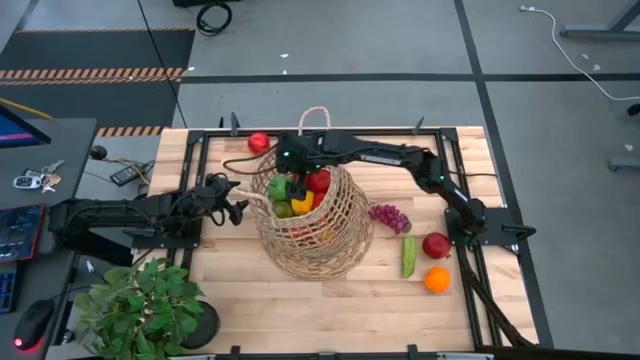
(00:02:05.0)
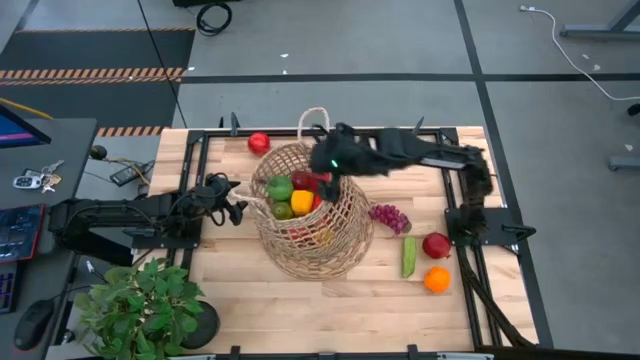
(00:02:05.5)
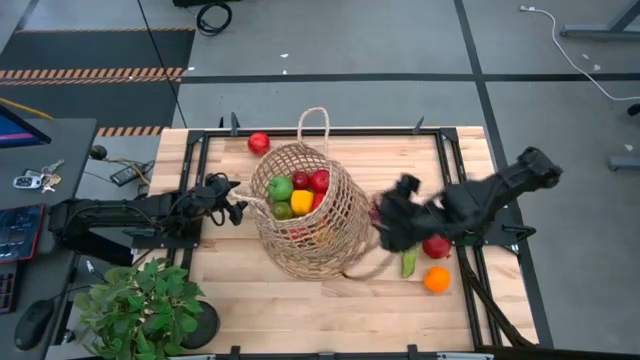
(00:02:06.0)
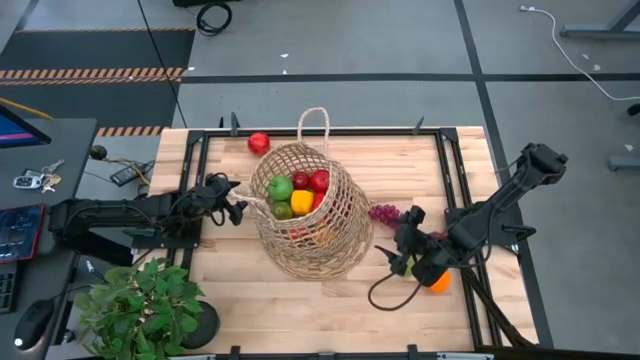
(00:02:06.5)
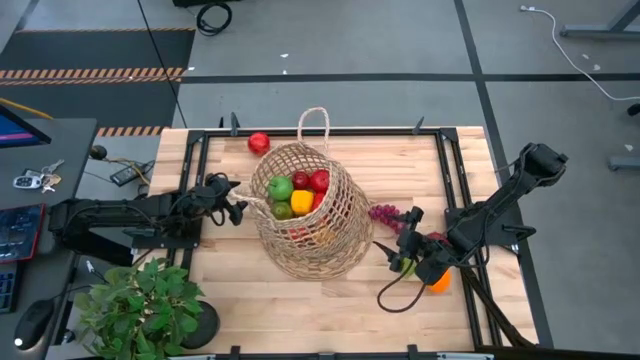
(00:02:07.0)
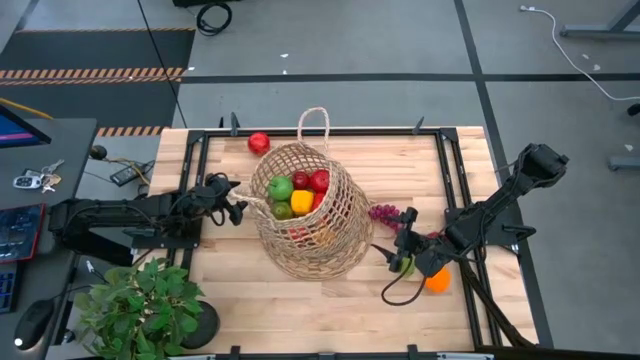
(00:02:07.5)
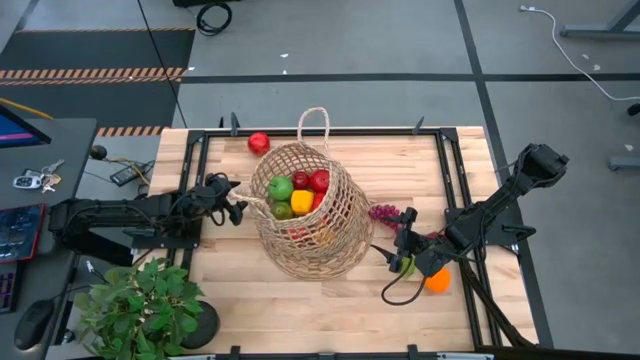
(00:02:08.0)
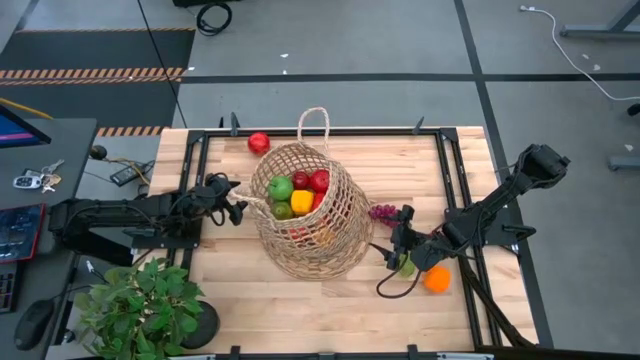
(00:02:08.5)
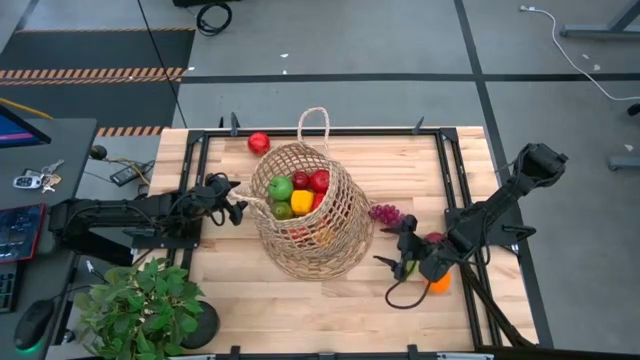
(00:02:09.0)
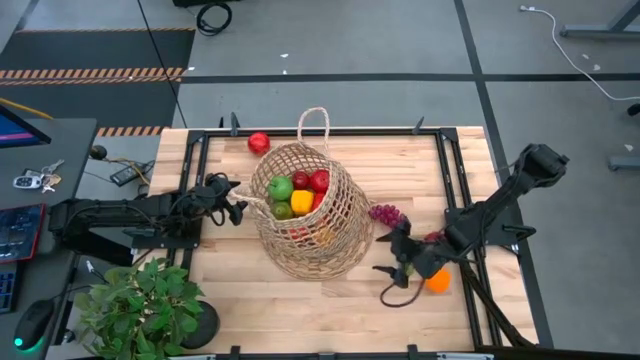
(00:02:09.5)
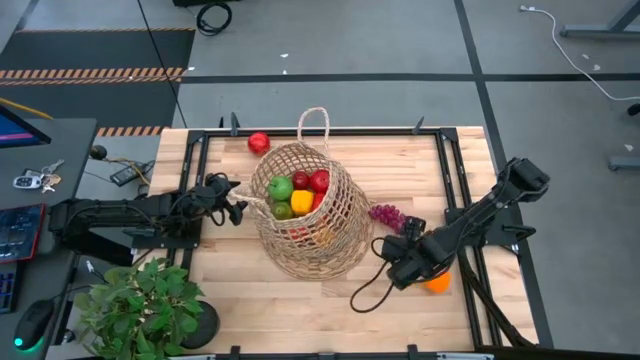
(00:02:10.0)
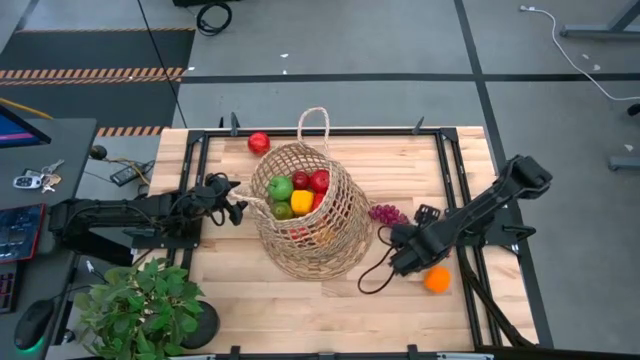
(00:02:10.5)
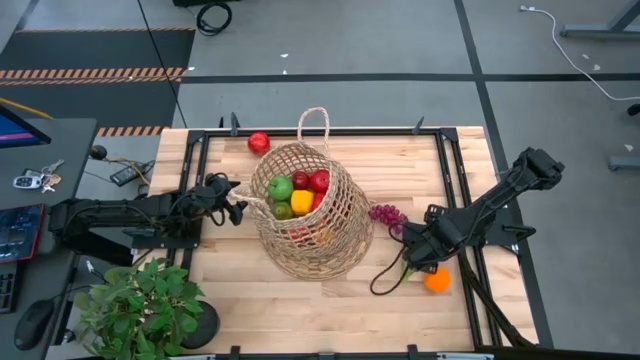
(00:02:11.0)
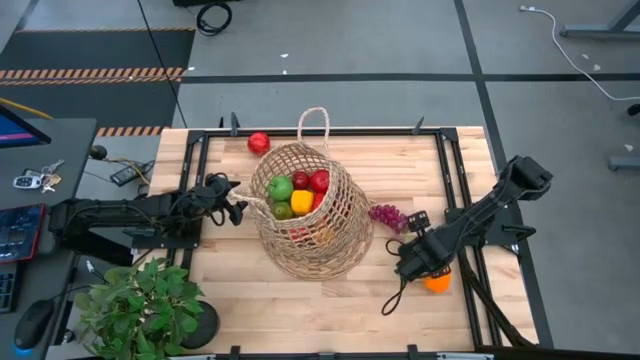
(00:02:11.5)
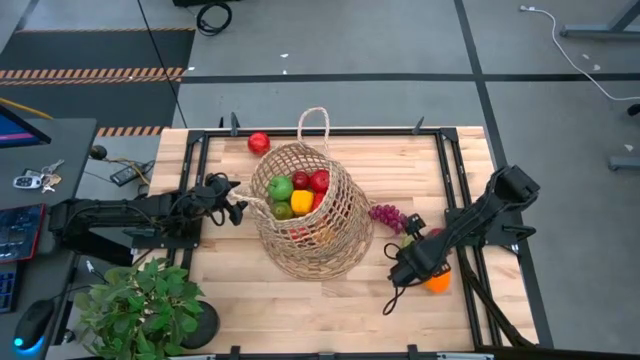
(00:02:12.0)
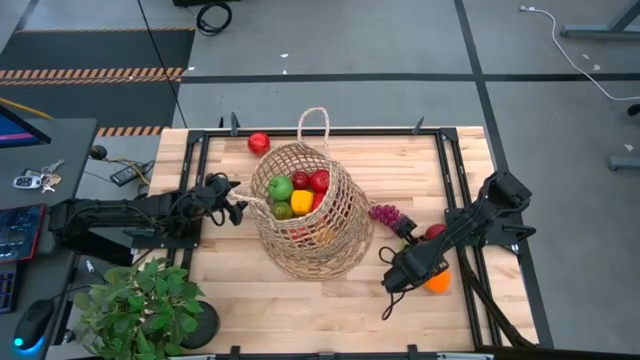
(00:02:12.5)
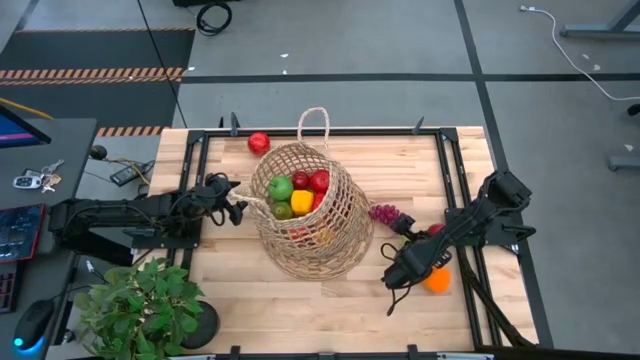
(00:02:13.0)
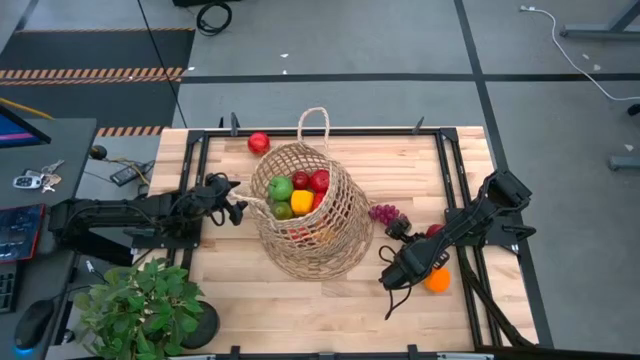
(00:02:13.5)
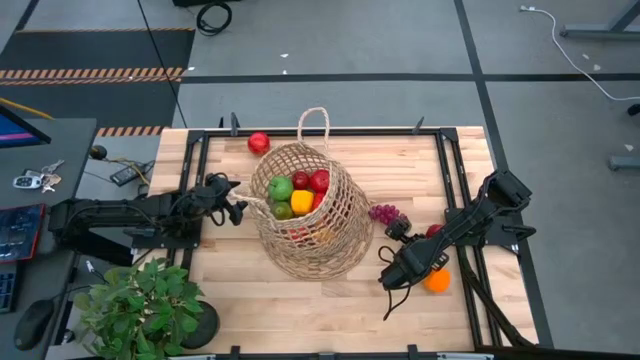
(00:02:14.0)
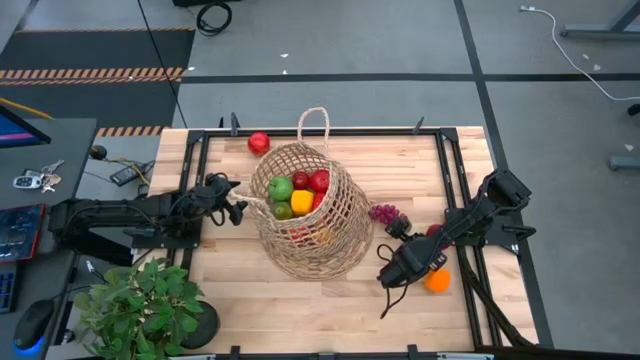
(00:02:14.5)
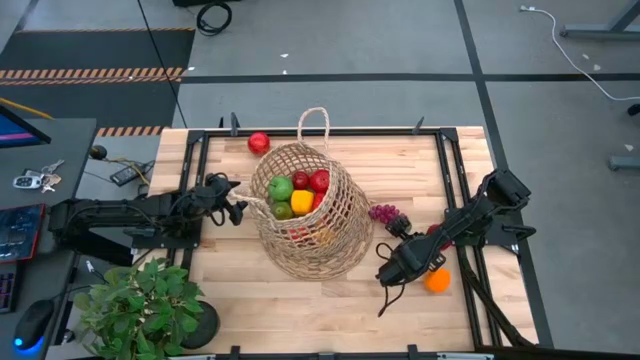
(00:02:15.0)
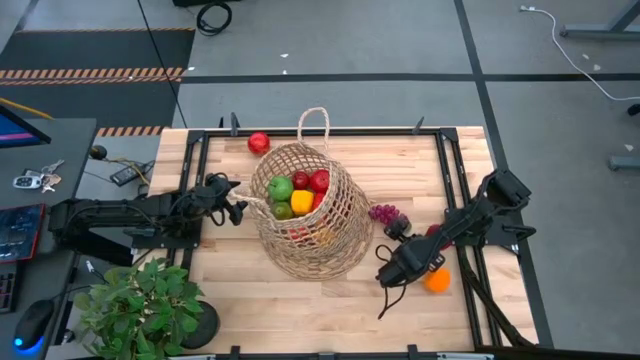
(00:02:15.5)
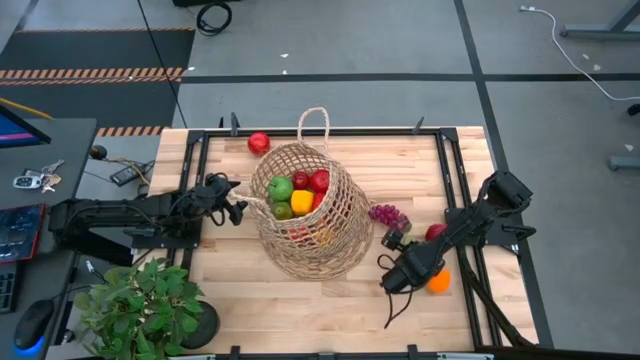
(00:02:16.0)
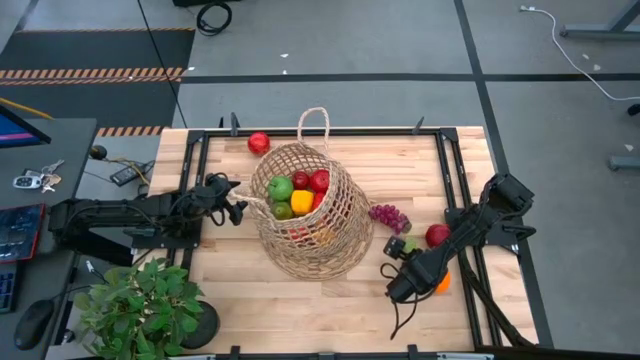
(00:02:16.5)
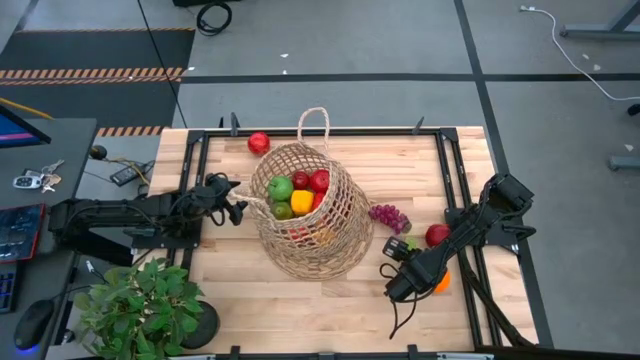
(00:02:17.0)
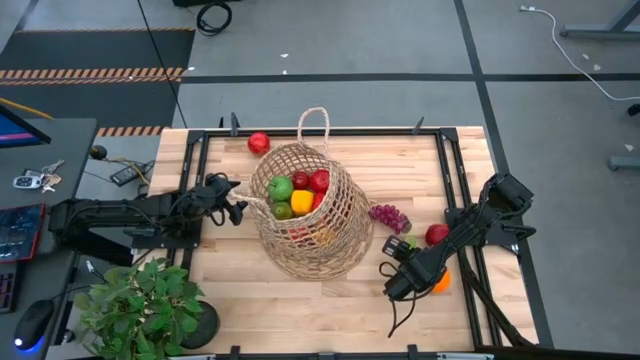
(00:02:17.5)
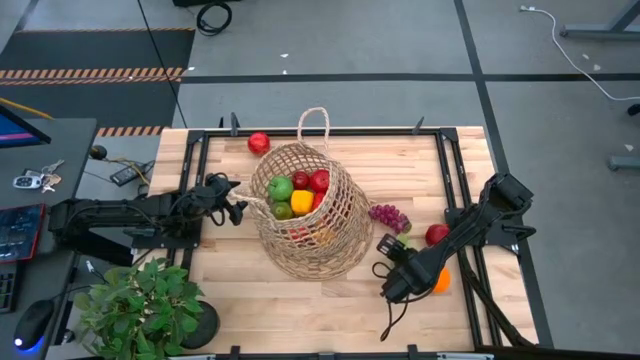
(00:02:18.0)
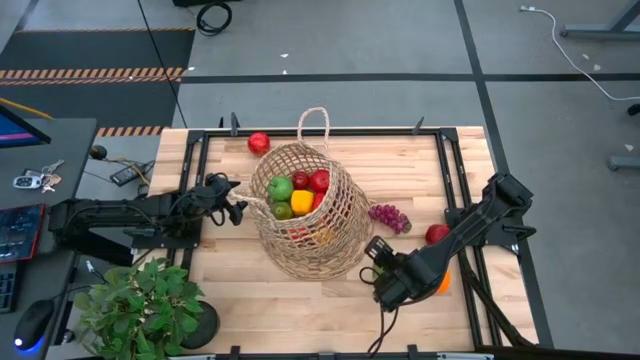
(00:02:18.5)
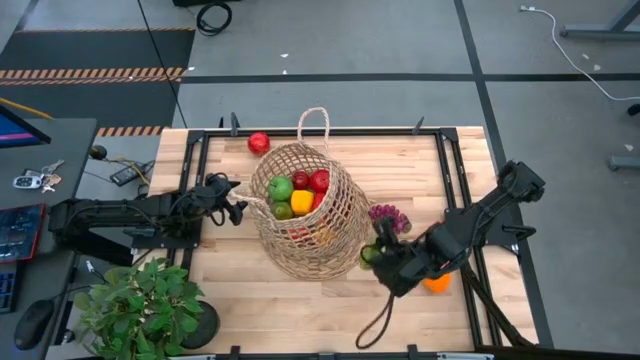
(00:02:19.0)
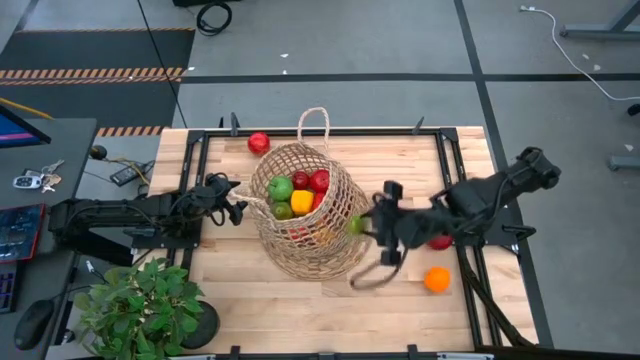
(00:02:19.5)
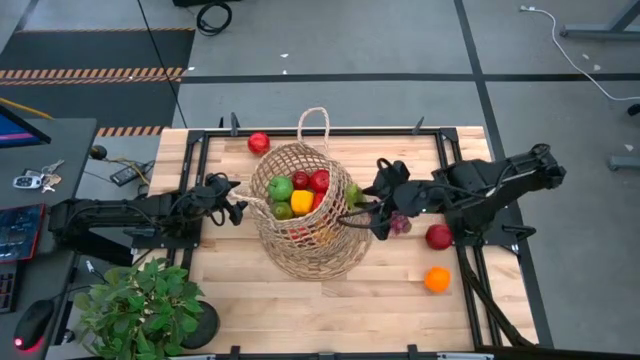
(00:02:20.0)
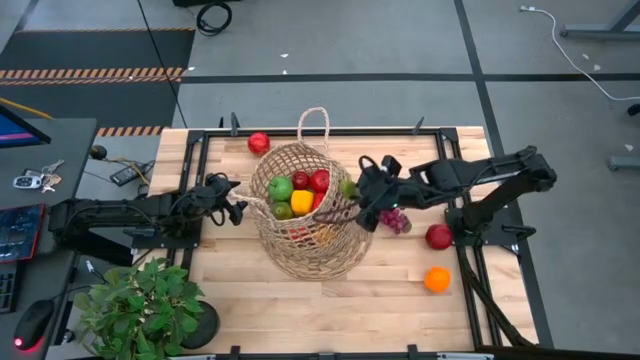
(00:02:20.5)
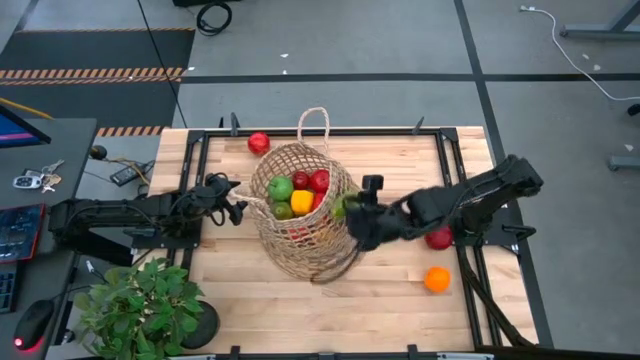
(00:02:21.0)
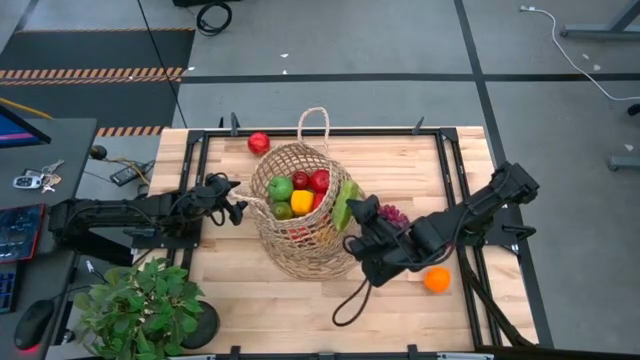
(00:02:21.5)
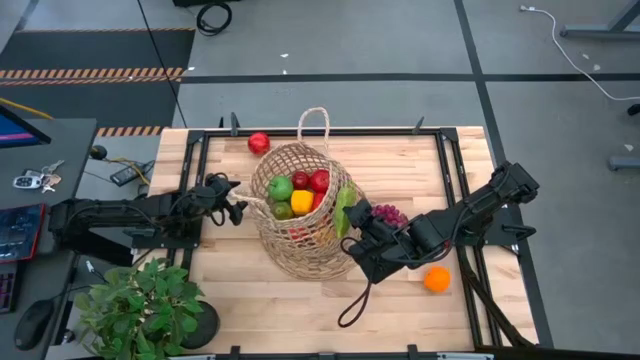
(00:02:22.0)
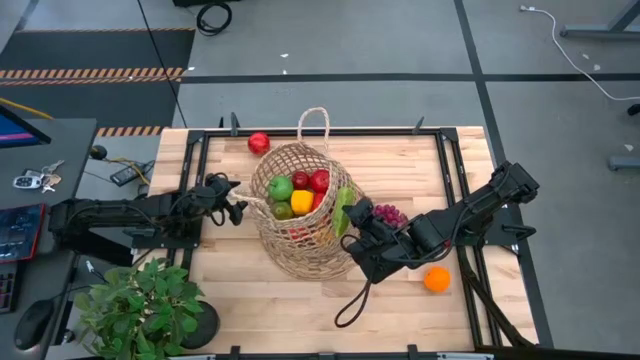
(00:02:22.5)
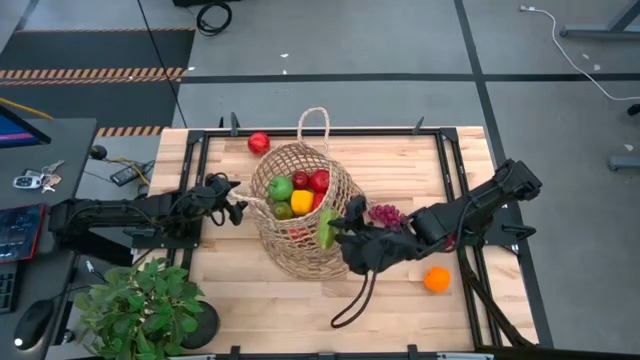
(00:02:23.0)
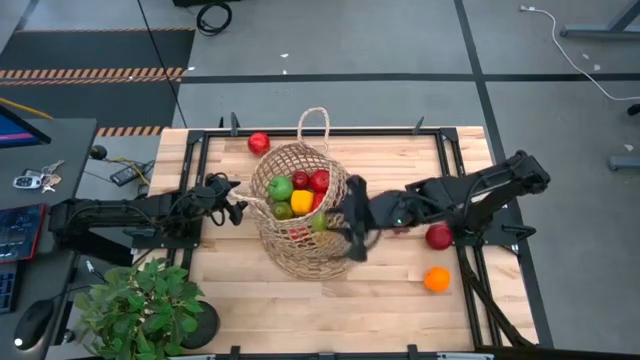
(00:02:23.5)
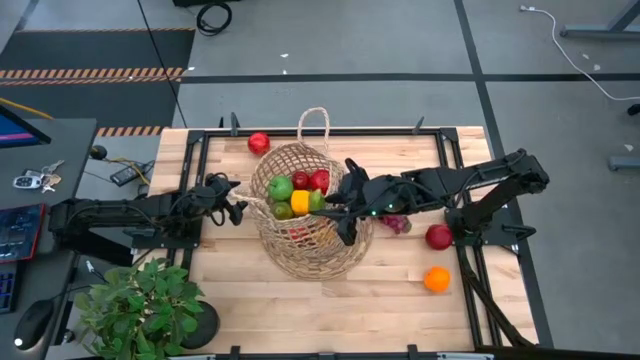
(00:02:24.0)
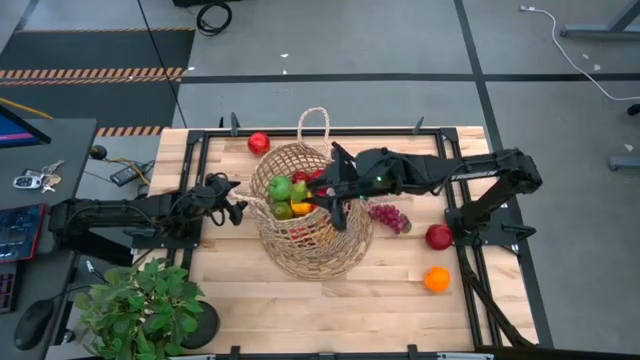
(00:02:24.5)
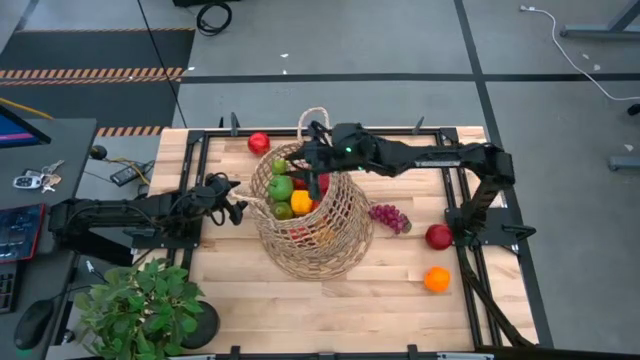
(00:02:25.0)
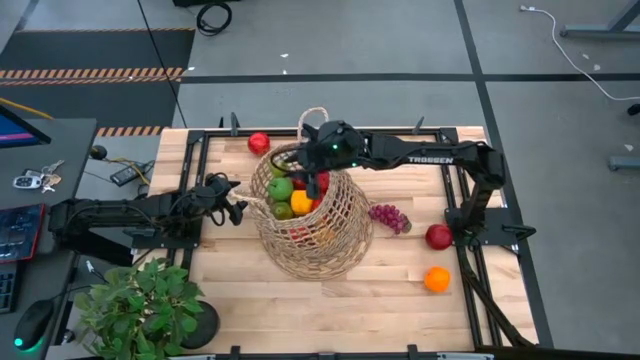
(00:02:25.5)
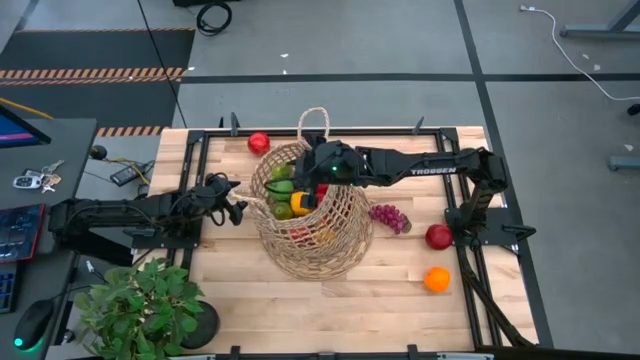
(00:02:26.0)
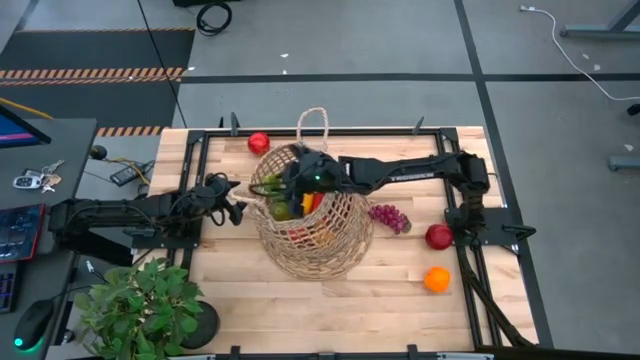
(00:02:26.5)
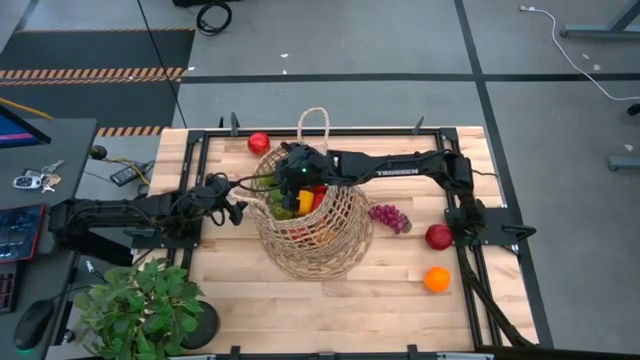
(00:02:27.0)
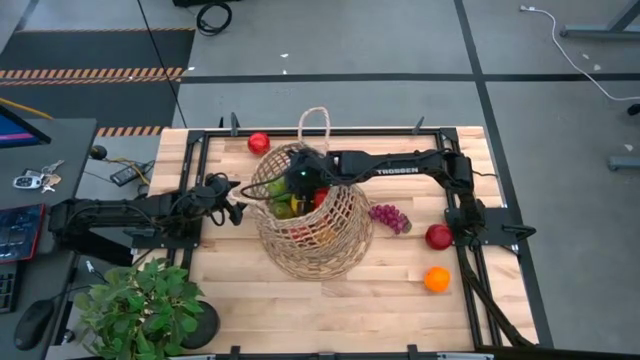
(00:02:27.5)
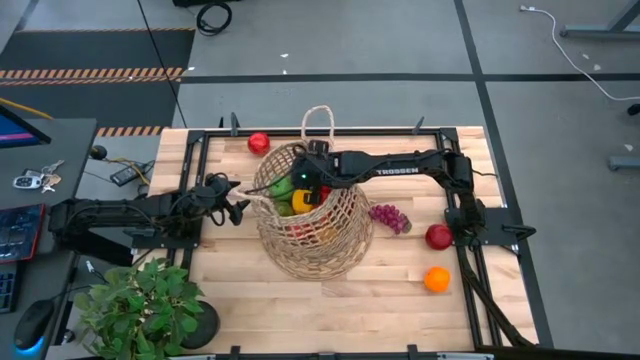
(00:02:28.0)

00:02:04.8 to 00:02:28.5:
Task: Build produce basket
Put the green cucumber into the basket
